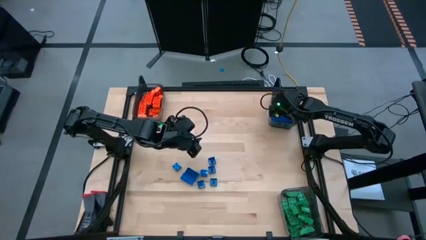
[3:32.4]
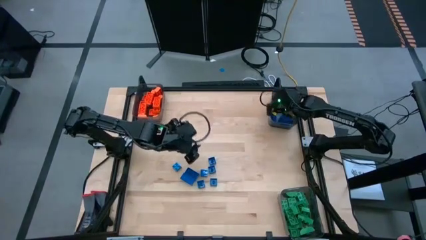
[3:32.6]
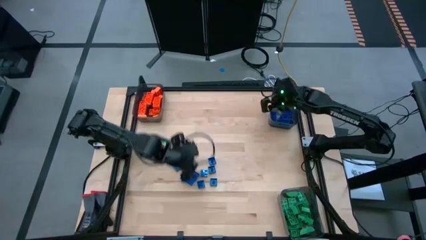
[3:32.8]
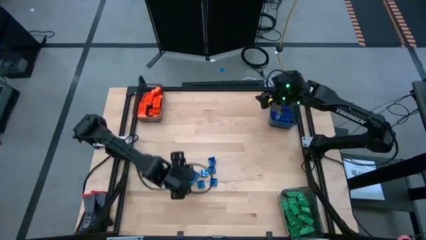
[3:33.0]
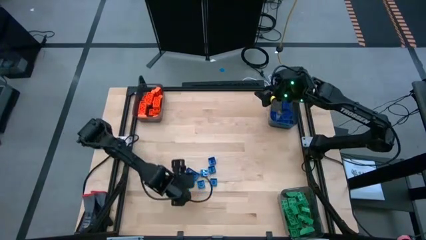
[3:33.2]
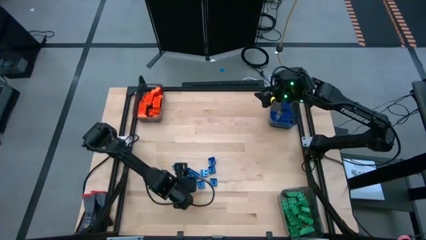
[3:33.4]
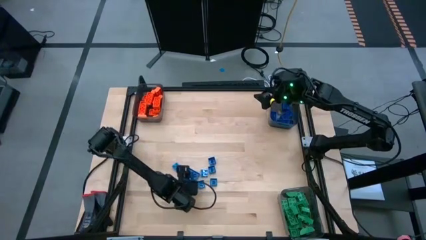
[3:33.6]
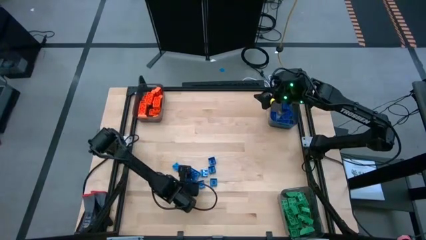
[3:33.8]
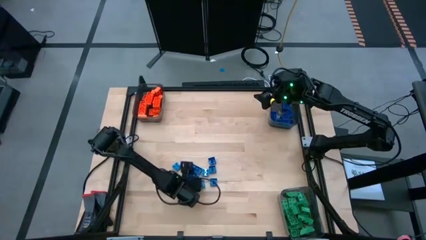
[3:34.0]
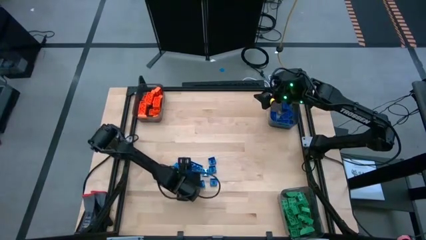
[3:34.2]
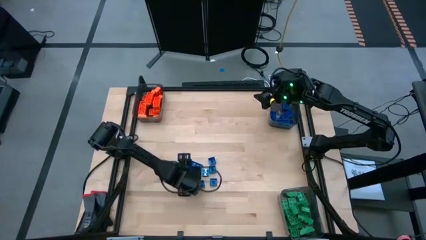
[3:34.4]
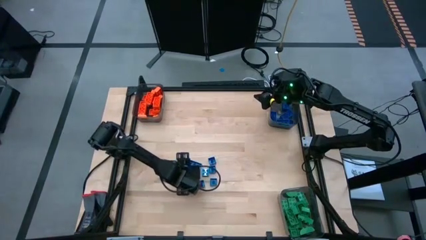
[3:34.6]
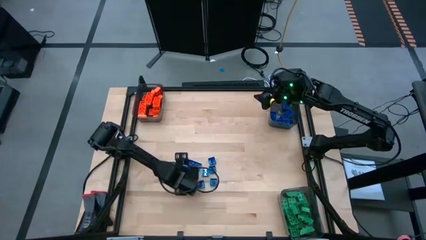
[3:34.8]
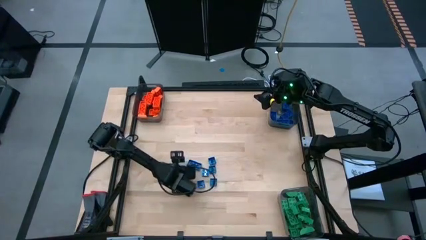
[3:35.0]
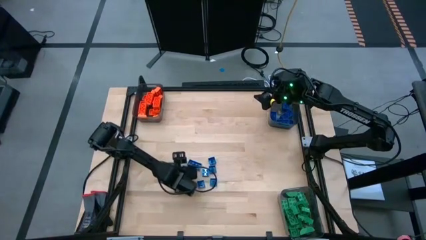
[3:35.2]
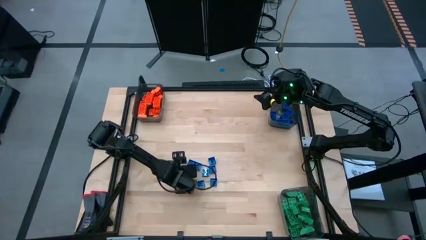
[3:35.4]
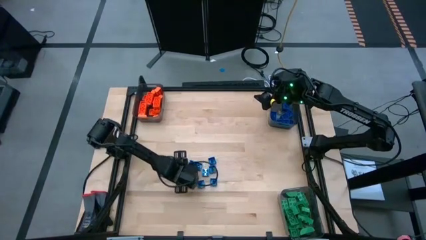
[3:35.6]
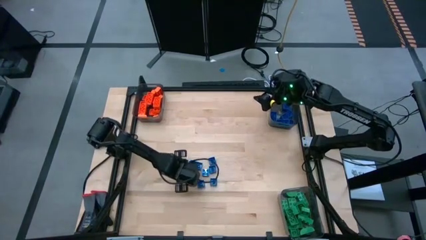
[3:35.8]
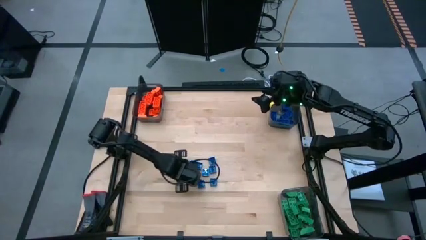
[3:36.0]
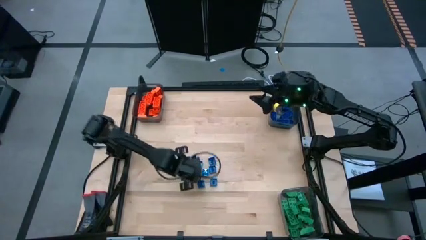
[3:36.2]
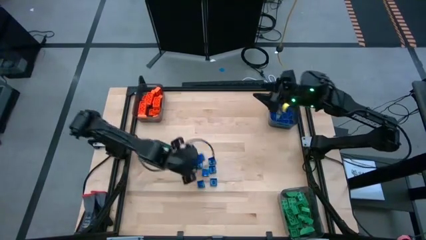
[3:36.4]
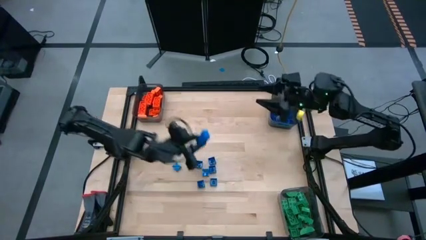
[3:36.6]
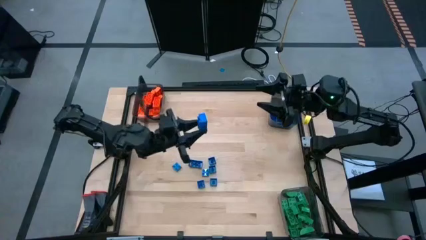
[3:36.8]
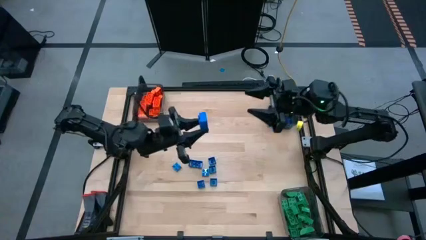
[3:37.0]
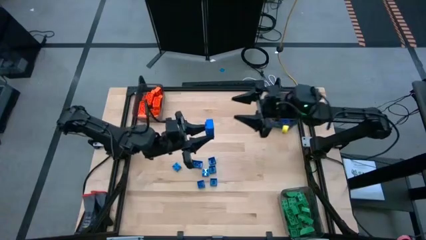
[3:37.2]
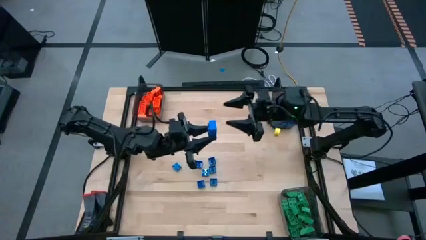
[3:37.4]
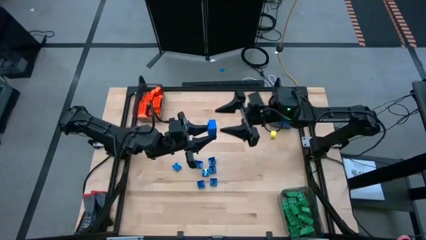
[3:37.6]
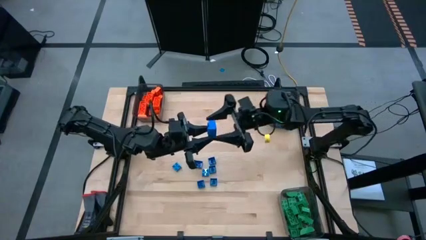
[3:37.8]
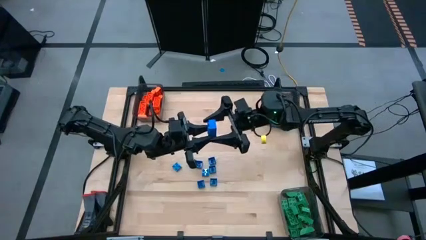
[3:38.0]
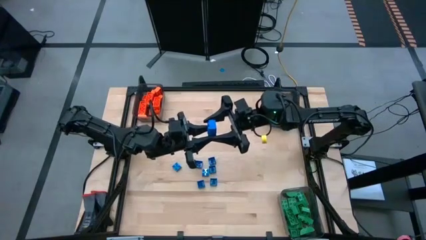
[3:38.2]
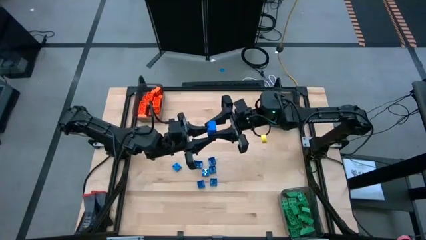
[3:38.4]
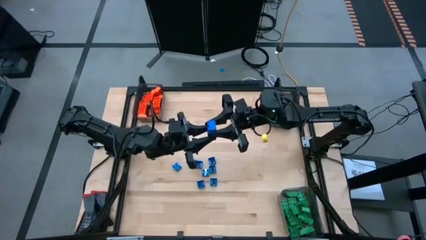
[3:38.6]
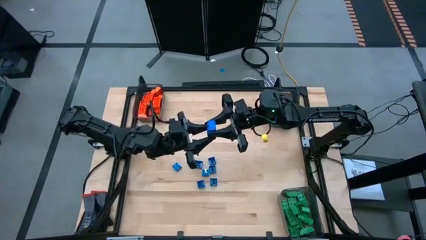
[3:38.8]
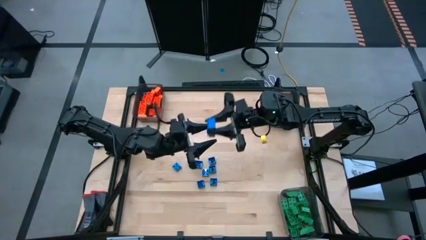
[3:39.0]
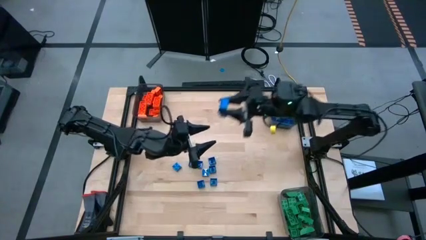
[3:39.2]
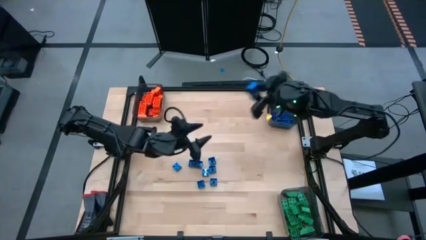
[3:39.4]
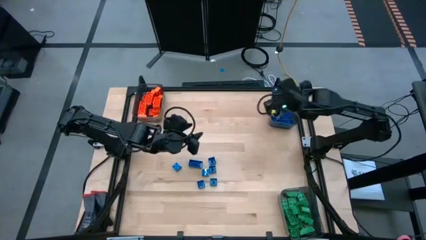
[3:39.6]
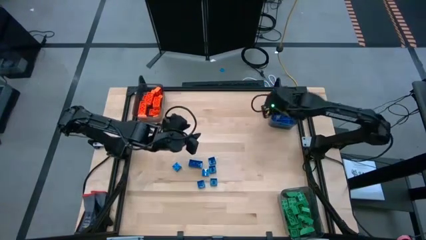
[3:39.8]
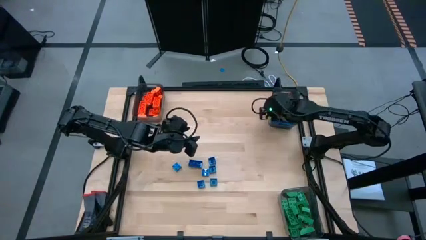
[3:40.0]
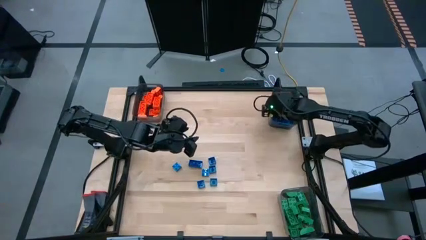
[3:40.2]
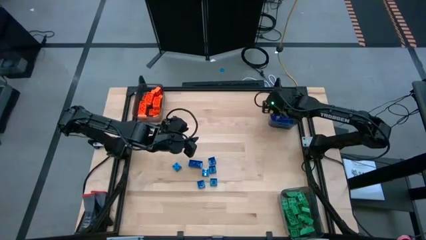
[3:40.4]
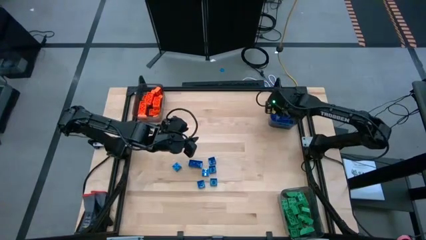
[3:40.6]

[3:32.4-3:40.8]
Task: Sort blocks
Put the blue game piece into the top right black bin

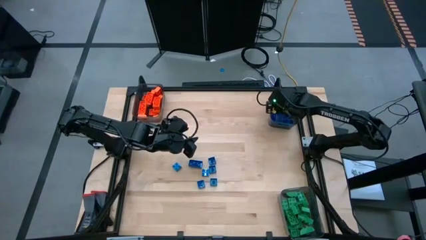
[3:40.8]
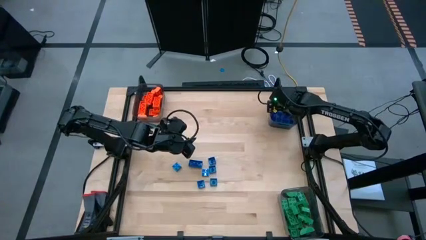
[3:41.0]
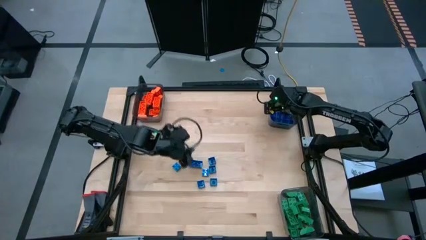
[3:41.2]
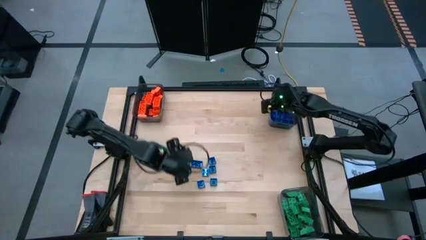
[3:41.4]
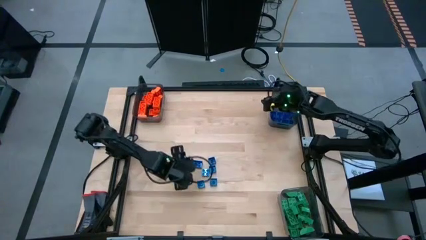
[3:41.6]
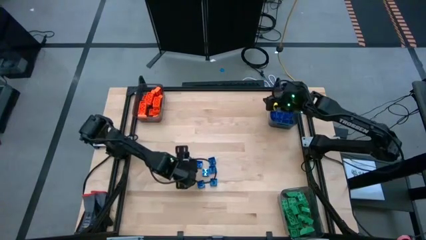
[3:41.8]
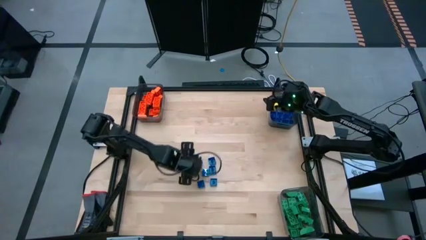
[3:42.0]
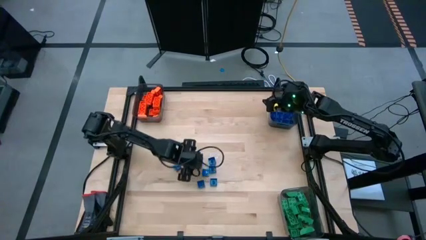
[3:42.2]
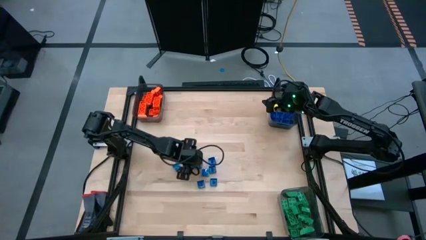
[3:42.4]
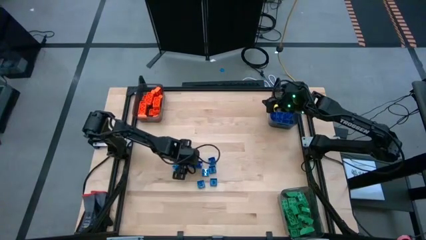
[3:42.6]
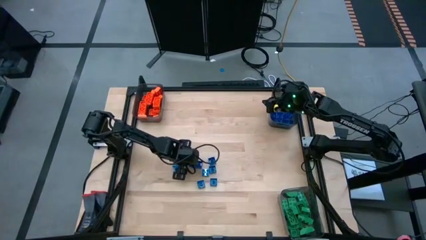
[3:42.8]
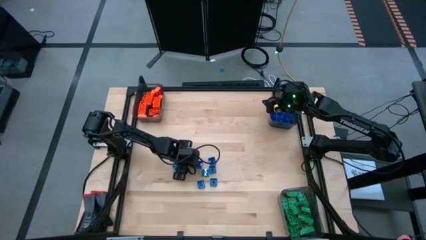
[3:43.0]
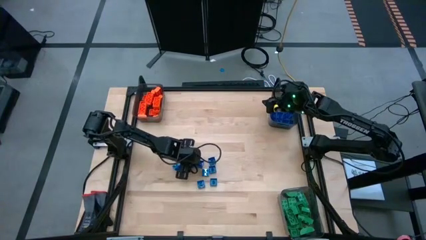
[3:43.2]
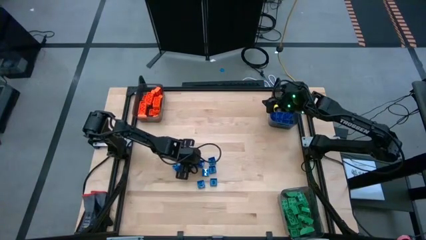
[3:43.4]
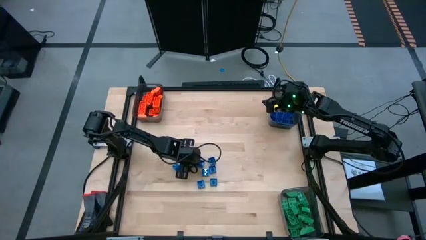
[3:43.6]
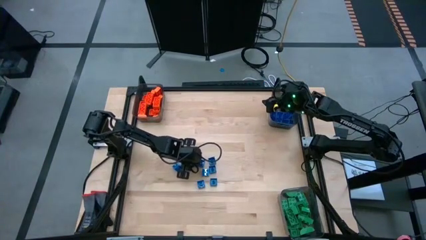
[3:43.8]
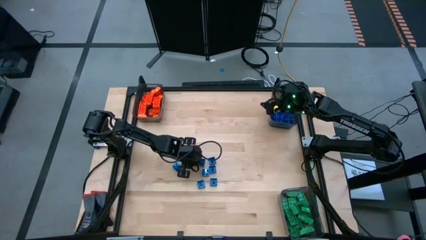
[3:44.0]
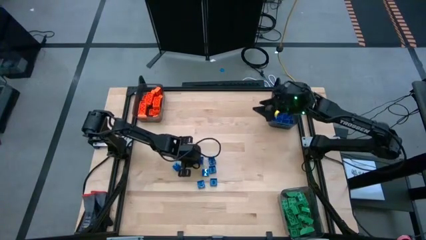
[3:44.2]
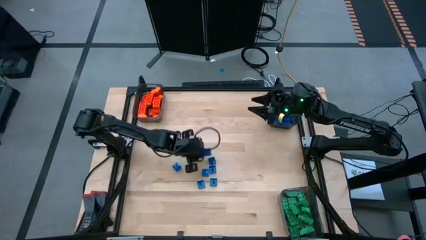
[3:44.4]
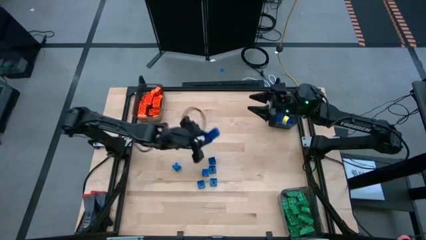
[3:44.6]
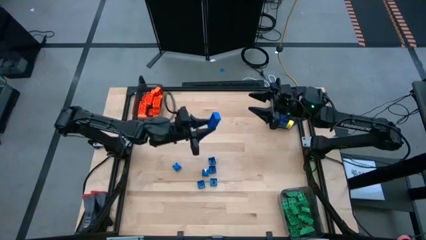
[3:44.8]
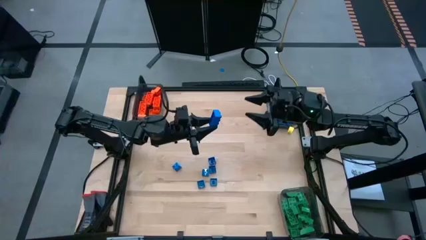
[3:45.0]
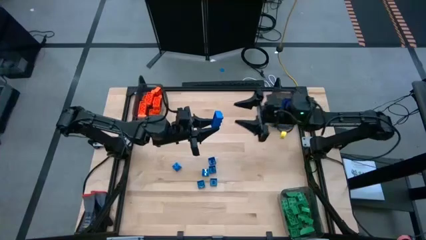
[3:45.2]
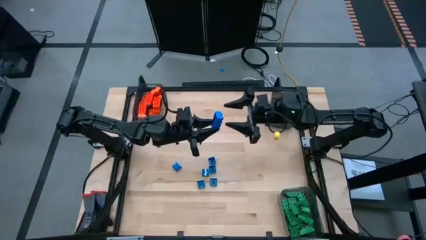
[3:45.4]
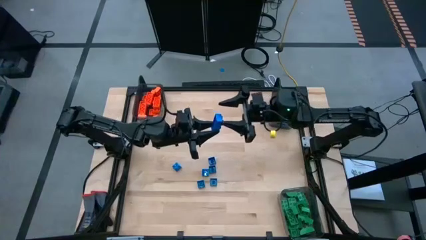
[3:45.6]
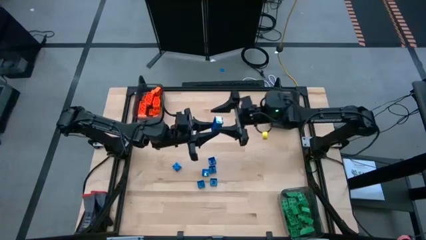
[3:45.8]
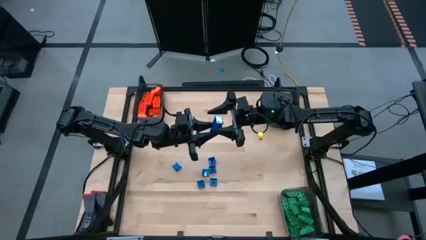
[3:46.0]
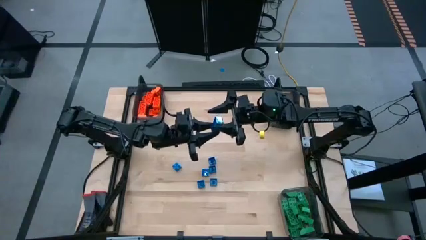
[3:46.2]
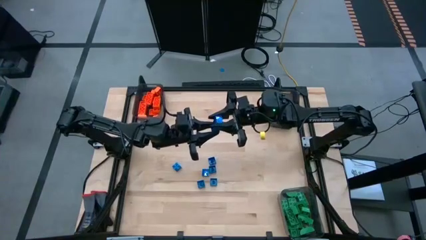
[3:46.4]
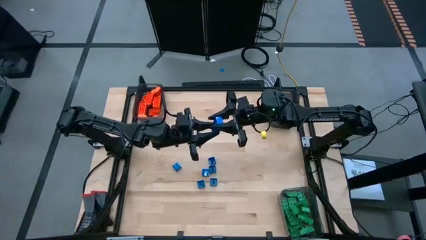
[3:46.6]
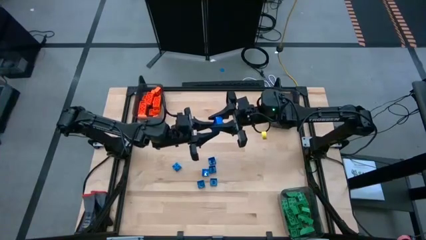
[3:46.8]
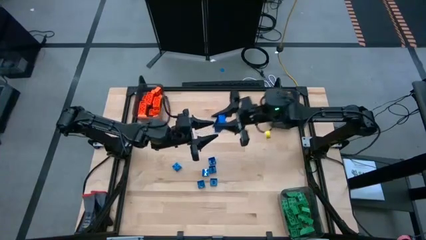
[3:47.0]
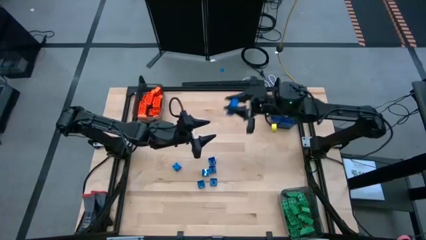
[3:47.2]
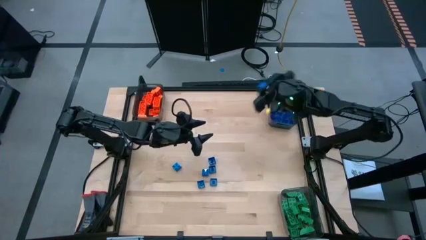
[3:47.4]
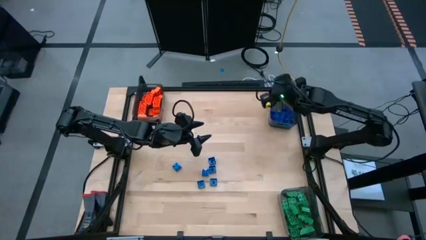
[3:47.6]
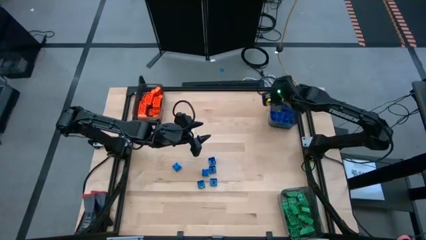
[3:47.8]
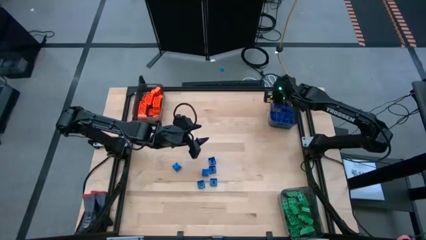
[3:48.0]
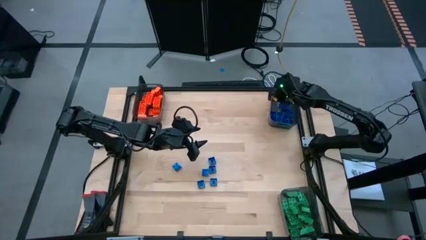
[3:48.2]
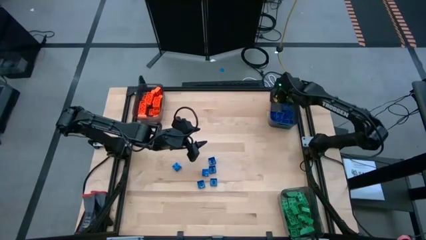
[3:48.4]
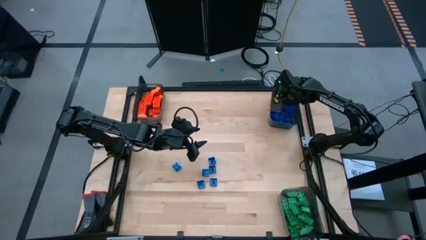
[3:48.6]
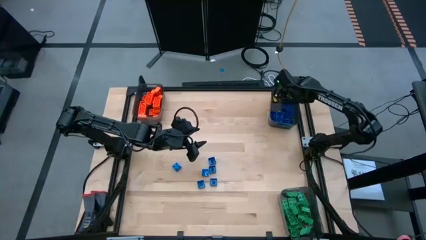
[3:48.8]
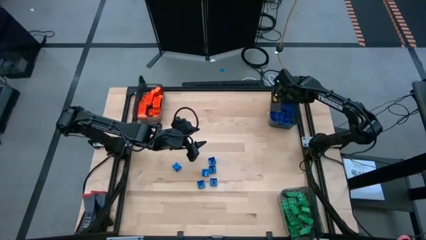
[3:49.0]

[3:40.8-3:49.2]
Put the blue game piece into the top right black bin
